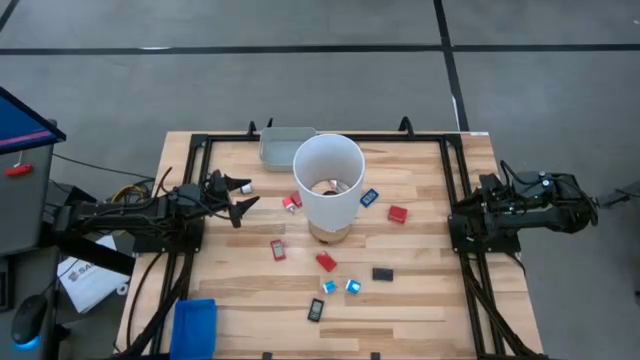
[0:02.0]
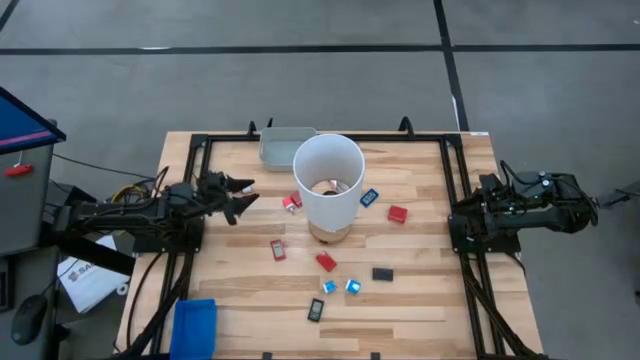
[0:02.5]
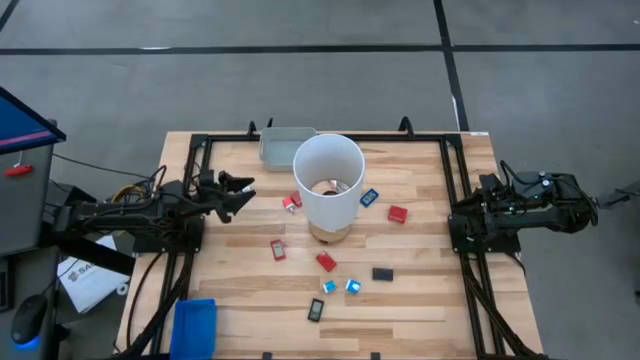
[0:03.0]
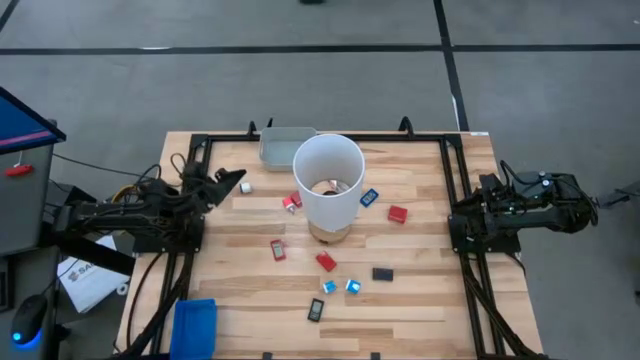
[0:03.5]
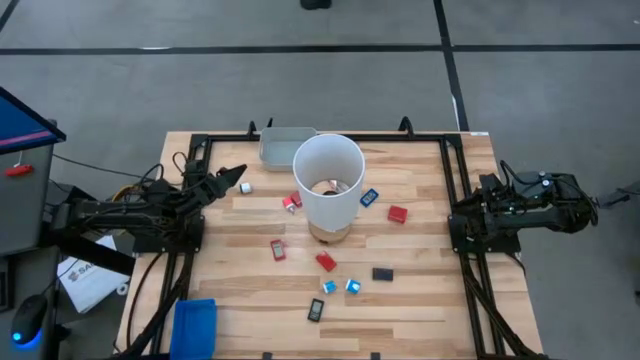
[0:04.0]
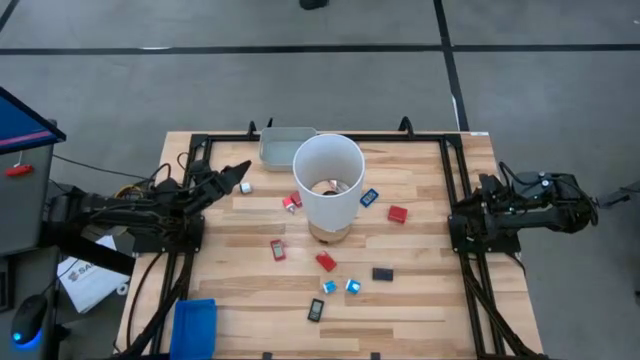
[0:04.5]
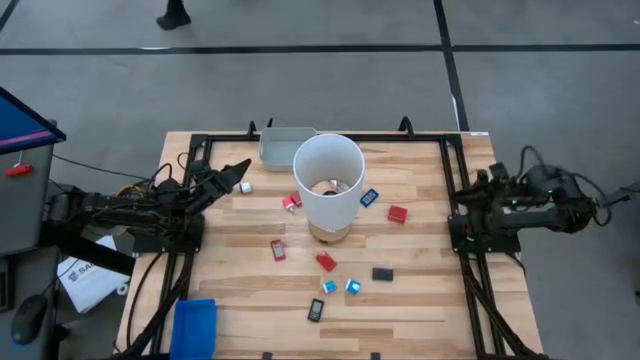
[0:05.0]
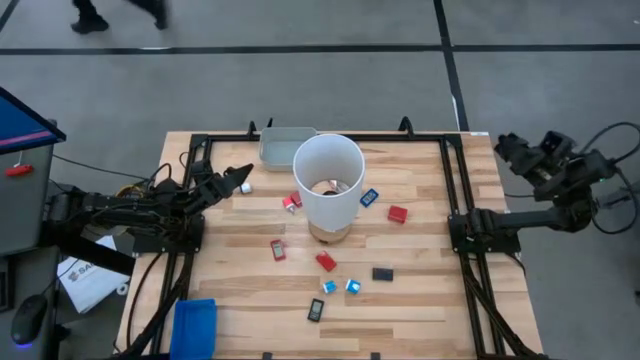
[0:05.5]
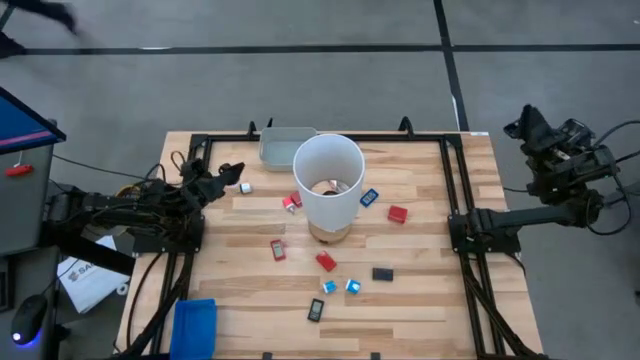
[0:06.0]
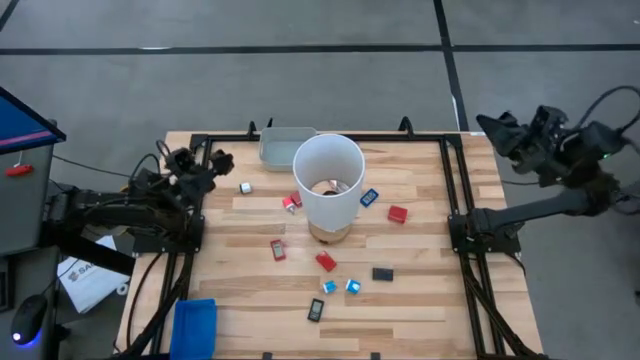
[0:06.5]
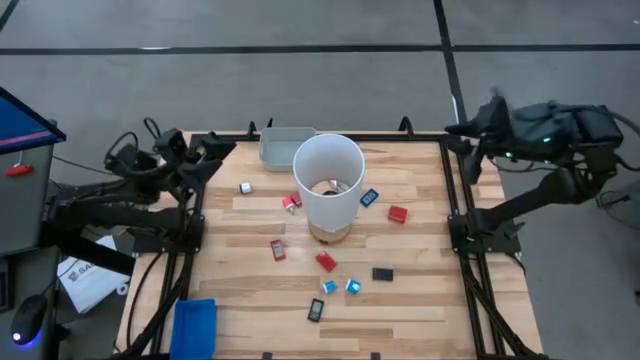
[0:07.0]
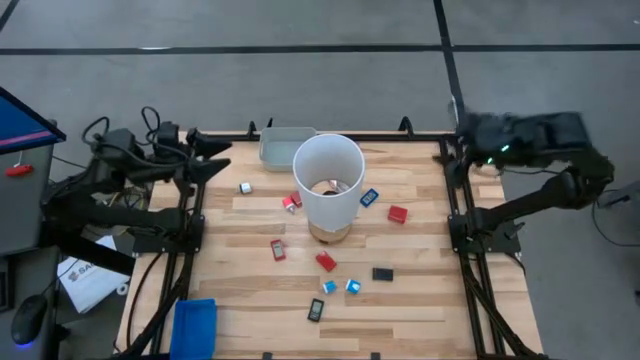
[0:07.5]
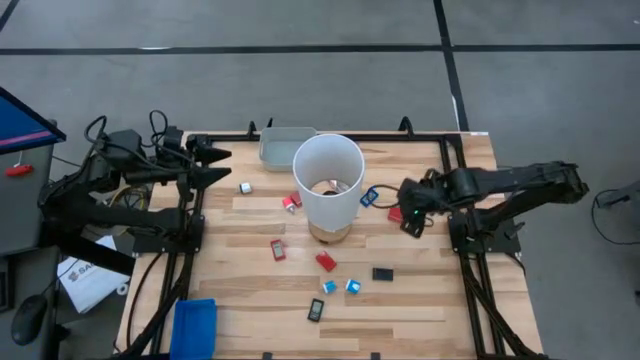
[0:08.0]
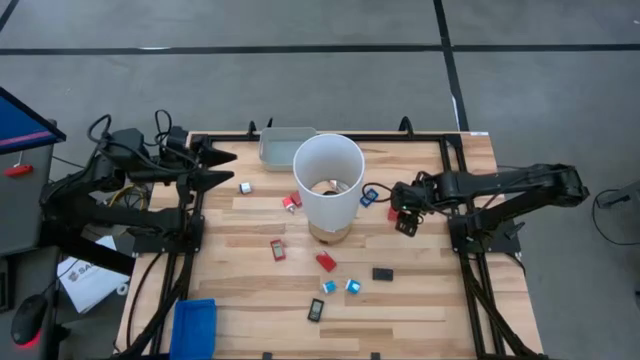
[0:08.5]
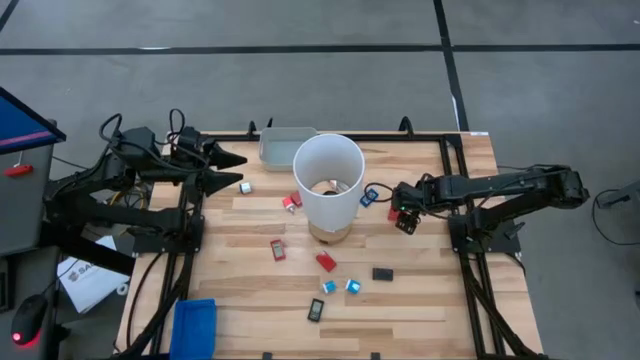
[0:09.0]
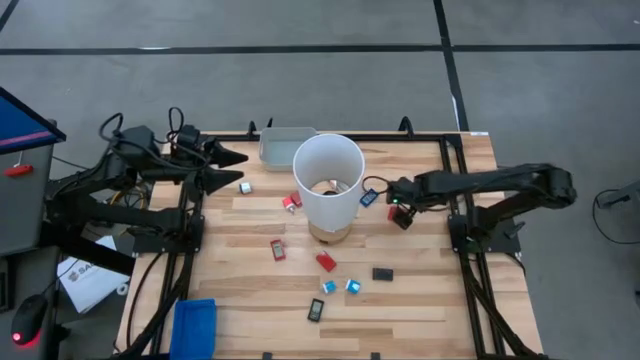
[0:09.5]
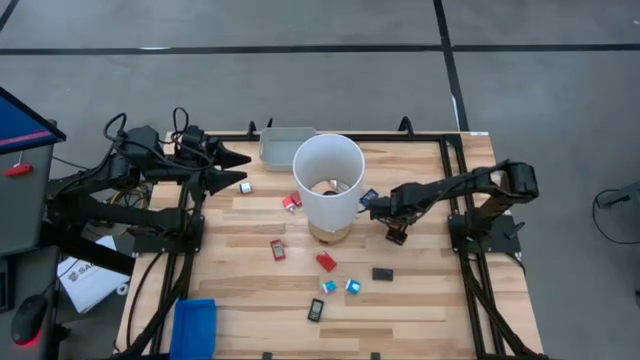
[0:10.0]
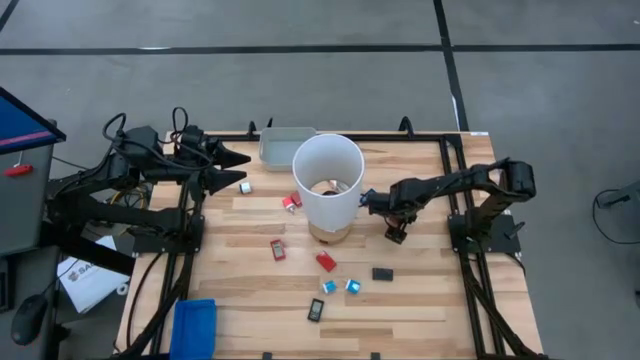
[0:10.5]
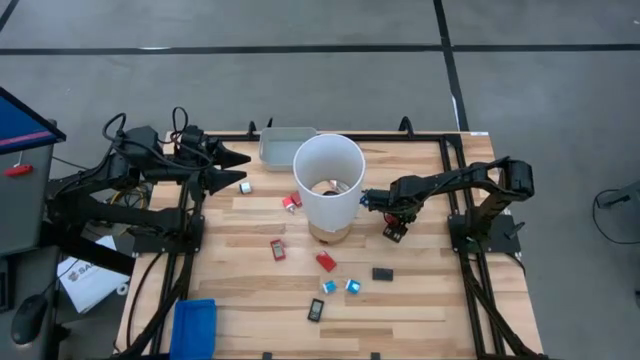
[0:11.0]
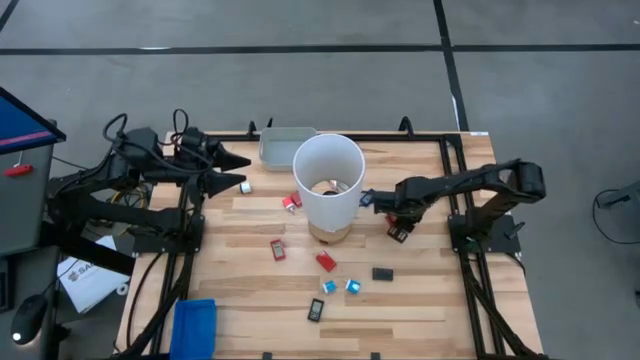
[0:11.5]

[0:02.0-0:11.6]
Task: Pick & Place Office items
Put the right red charger adapter into the gray bin

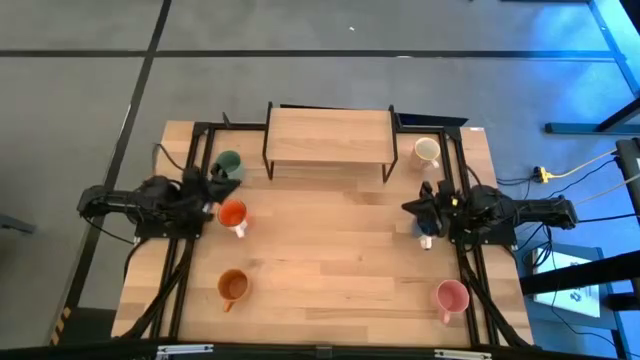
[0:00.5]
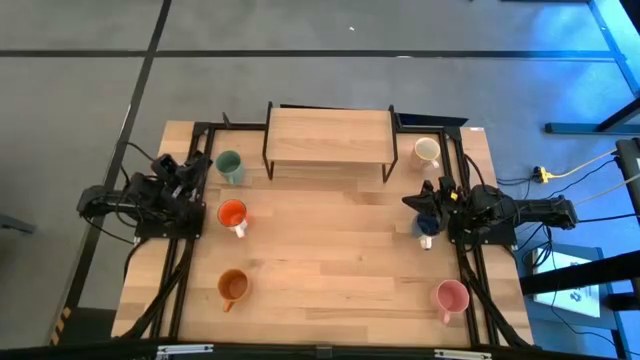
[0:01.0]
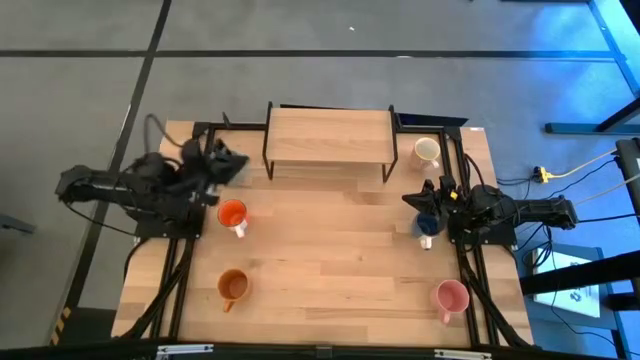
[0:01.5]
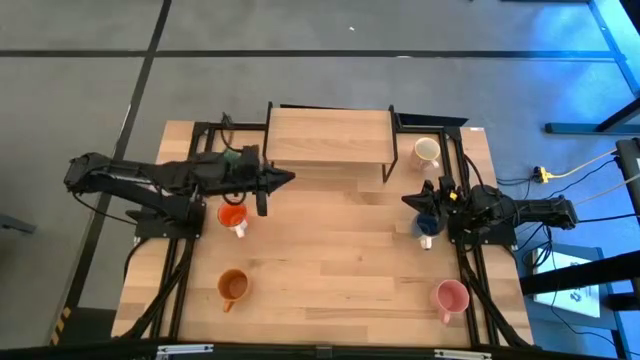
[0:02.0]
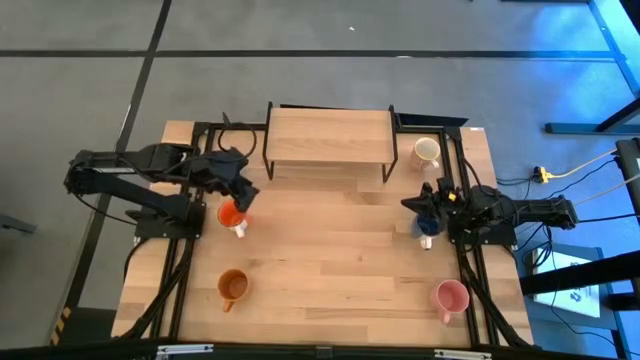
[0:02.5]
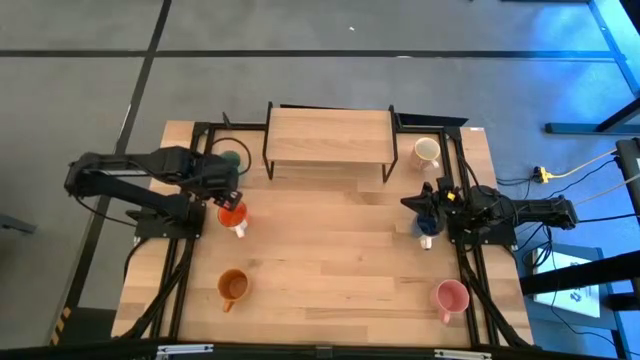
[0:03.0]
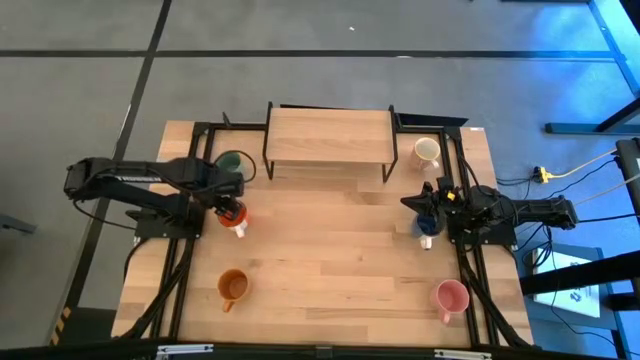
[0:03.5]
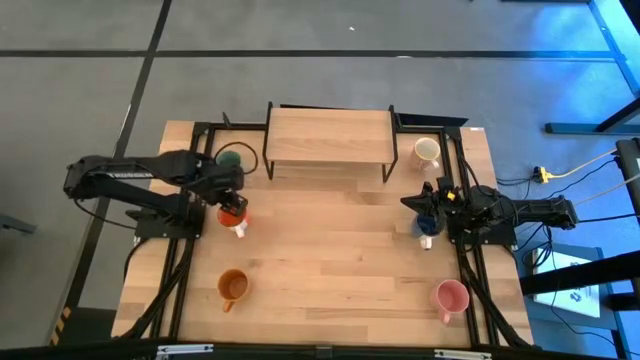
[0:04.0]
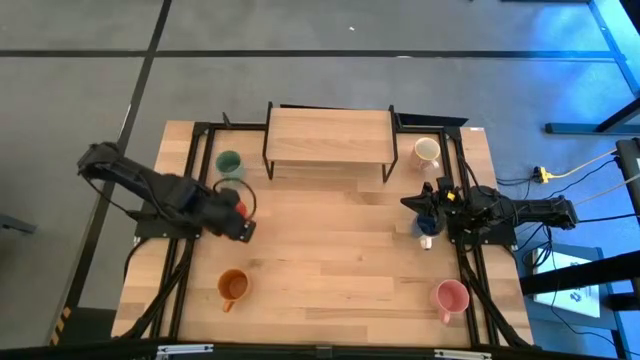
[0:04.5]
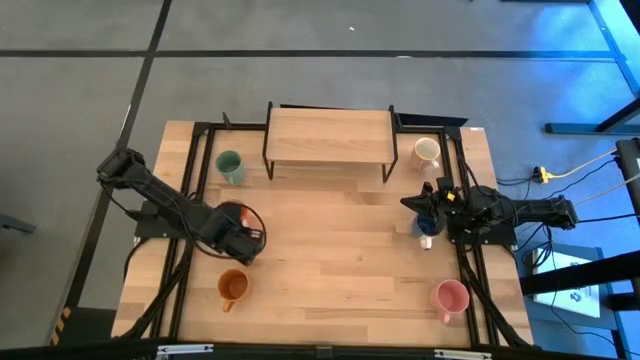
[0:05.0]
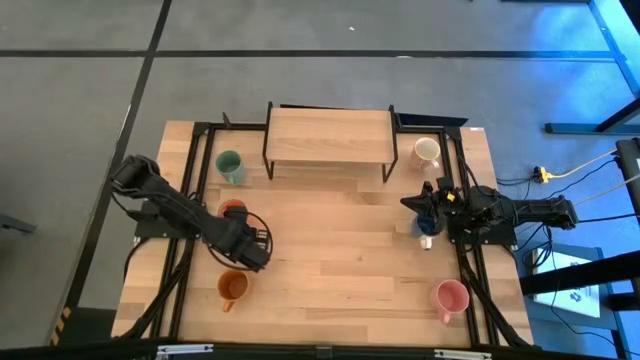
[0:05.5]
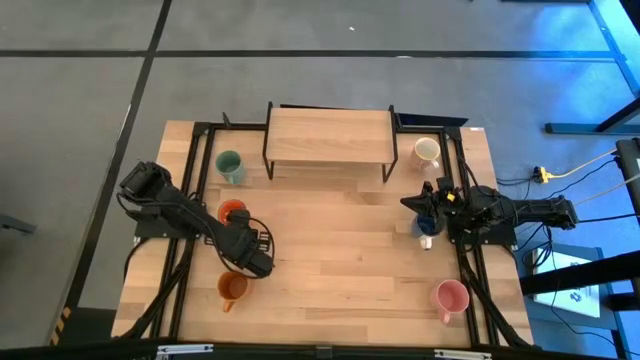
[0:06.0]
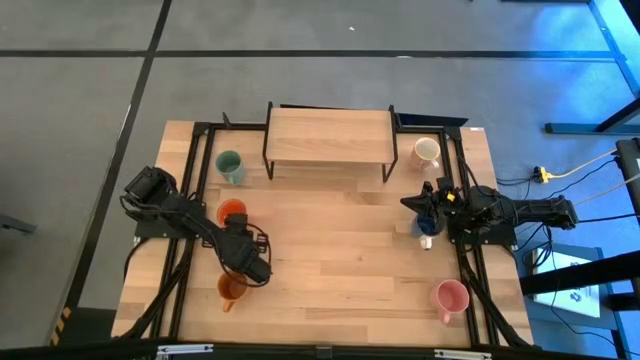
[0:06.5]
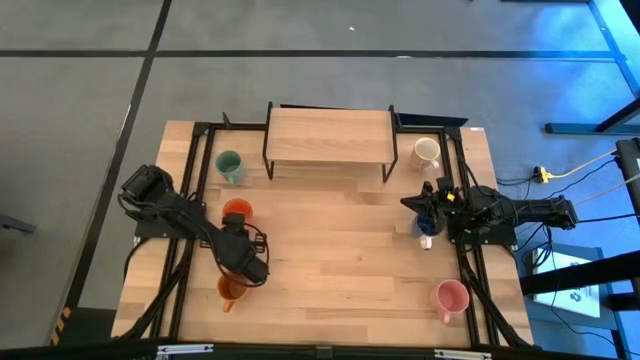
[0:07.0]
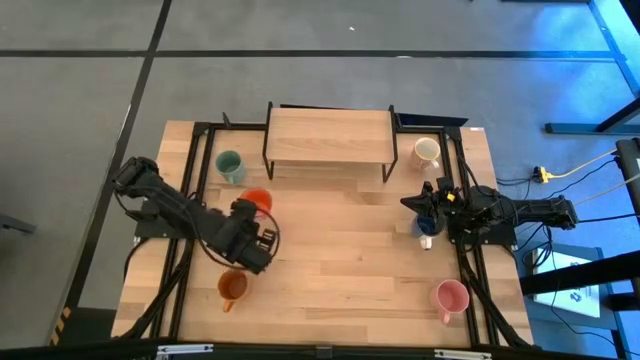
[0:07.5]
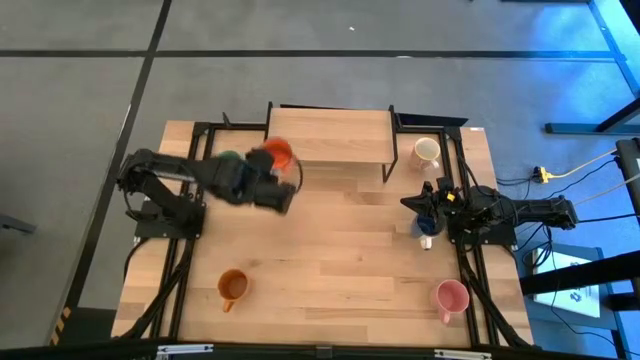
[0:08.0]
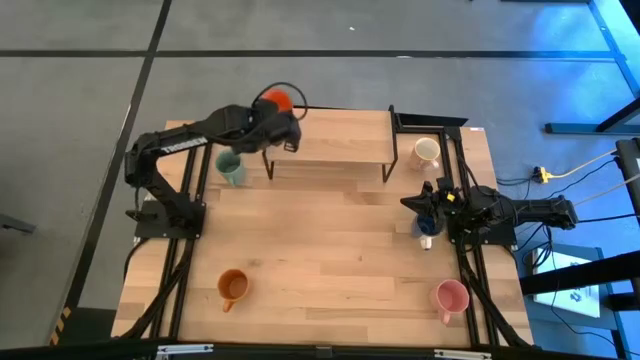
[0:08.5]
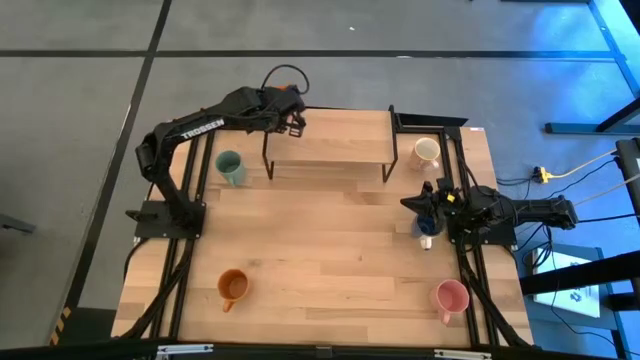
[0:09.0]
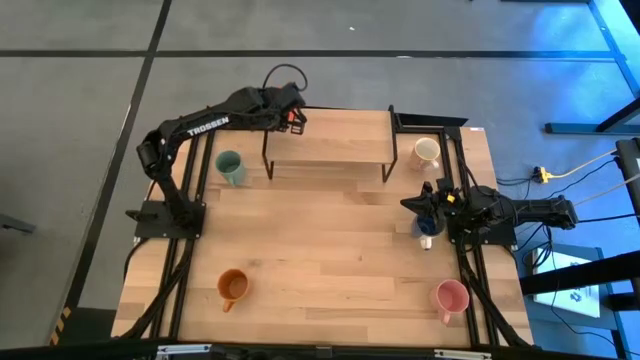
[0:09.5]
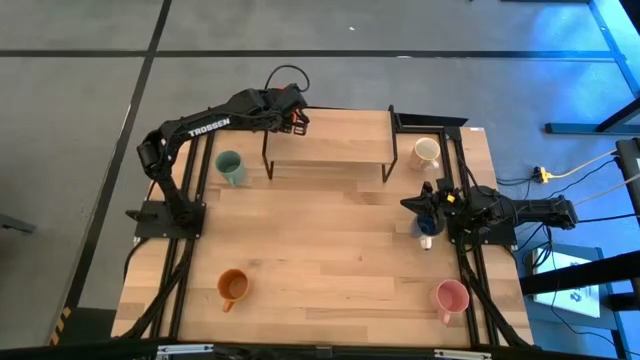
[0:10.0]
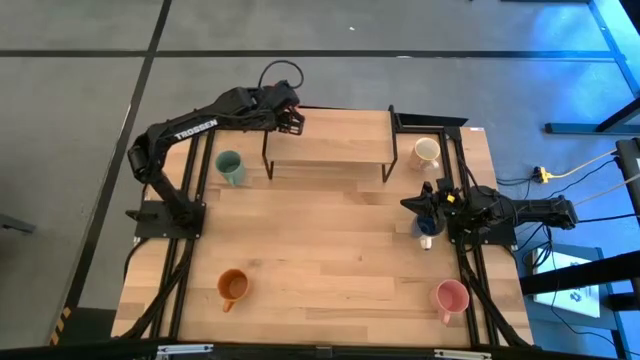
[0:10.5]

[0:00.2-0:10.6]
Task: Place coffee mugs
Put the top orange mug on the shelf
